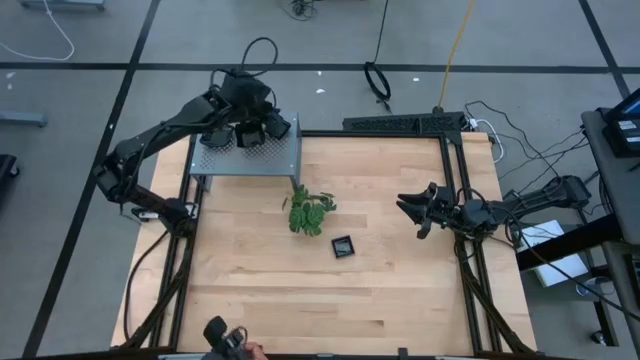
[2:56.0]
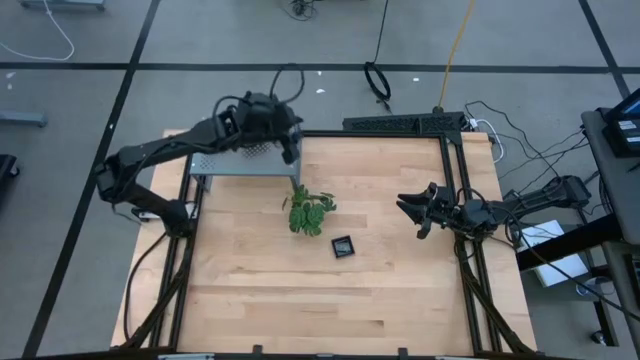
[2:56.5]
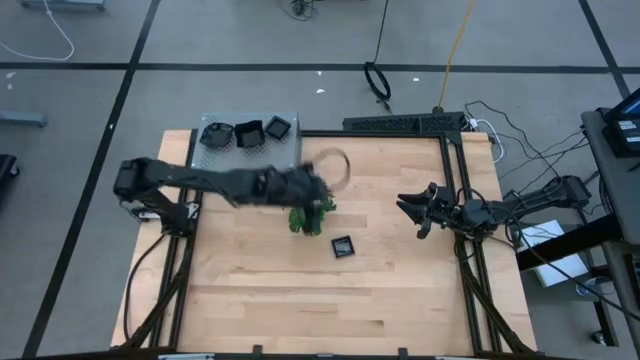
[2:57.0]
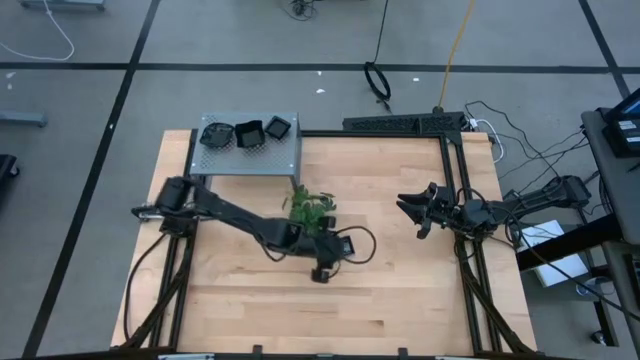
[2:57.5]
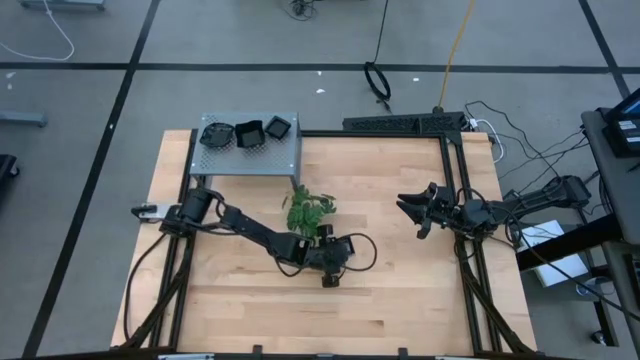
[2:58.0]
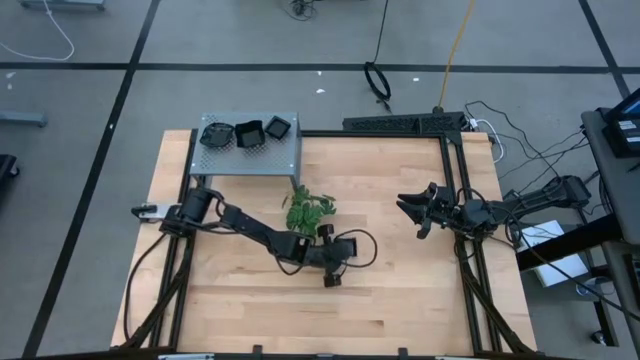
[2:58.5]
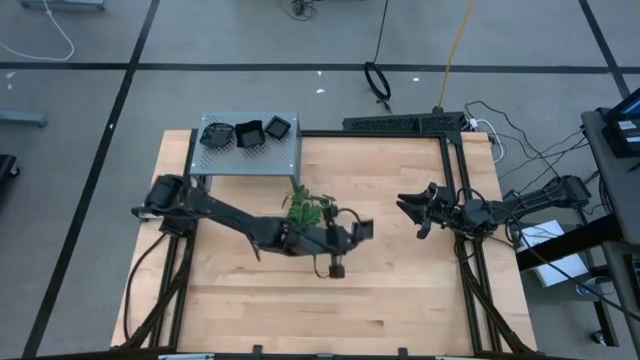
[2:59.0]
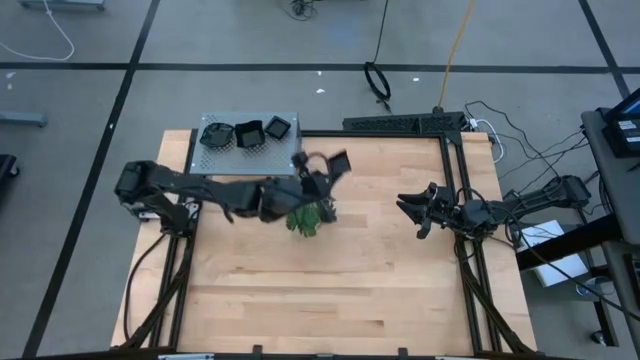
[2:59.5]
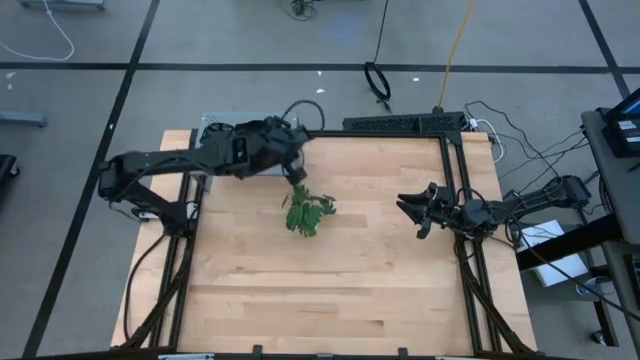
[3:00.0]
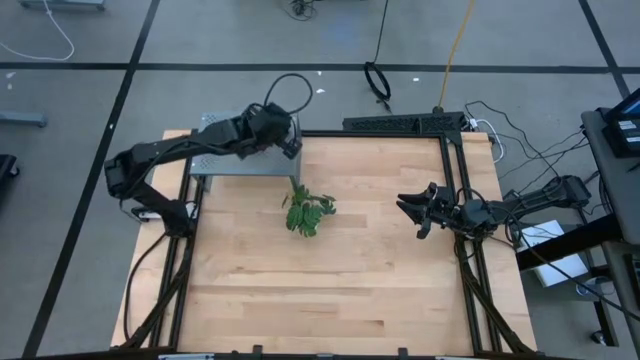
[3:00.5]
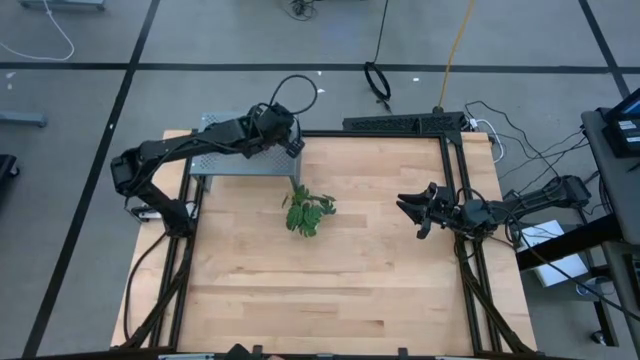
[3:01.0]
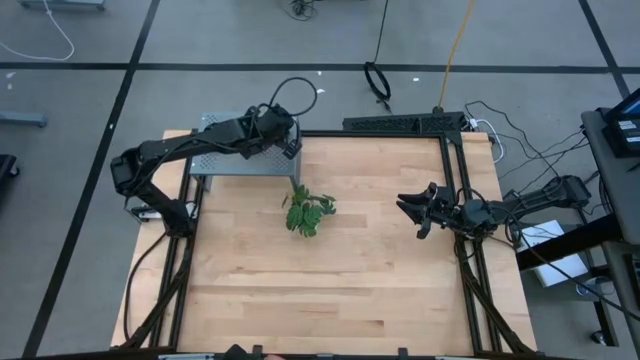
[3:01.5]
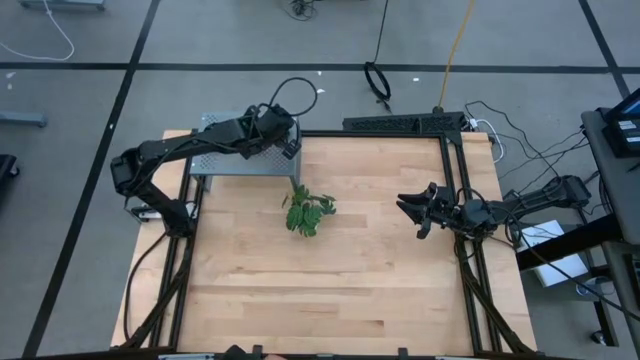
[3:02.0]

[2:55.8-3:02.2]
Task: Pick & Place Mini shaped plates
Stack the square plate on top of the square plate on the shelf

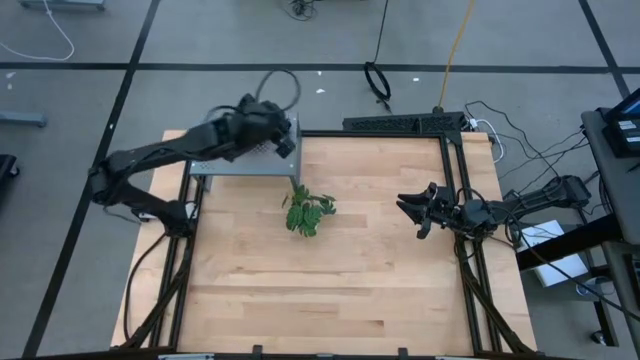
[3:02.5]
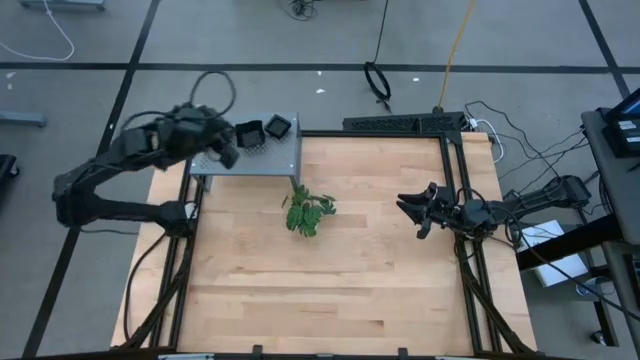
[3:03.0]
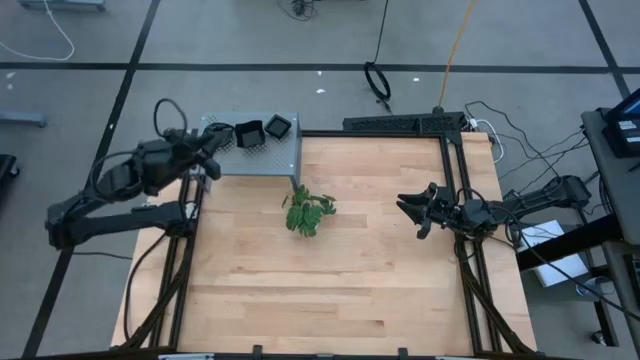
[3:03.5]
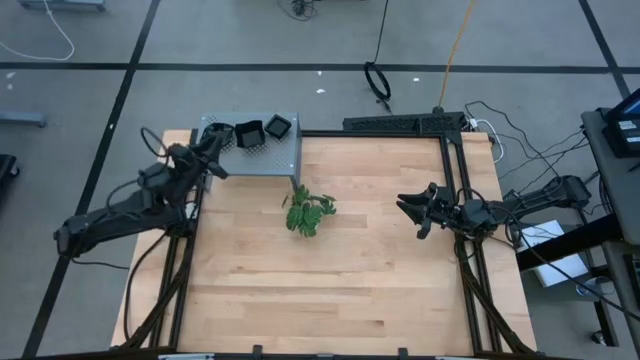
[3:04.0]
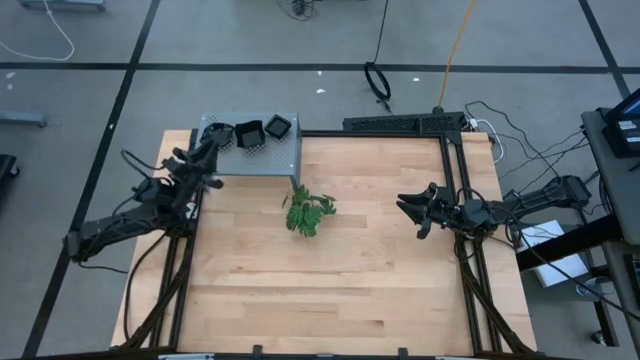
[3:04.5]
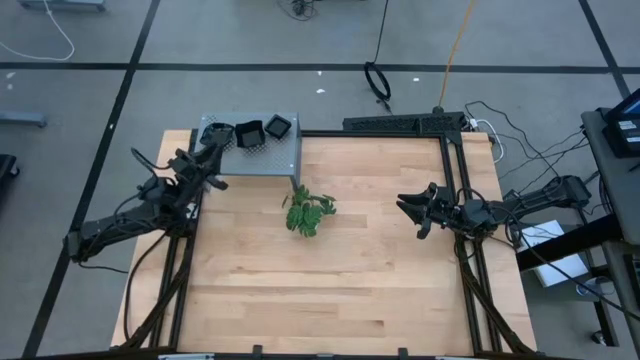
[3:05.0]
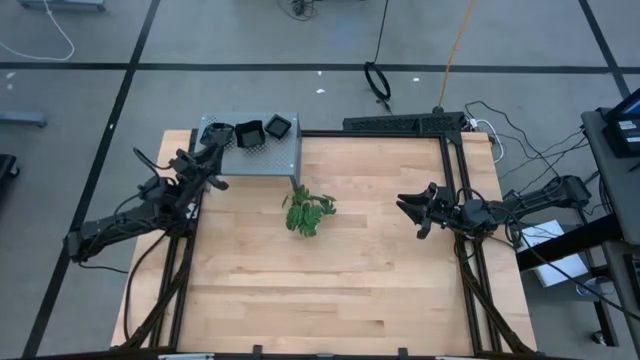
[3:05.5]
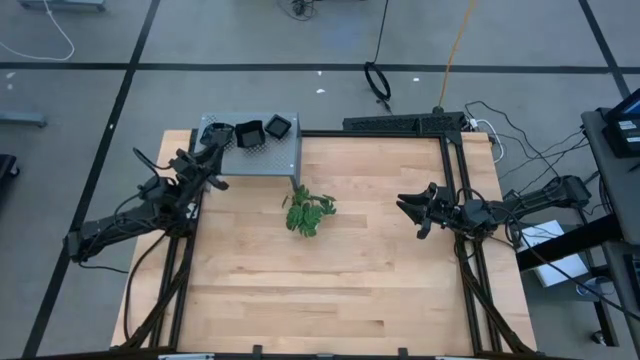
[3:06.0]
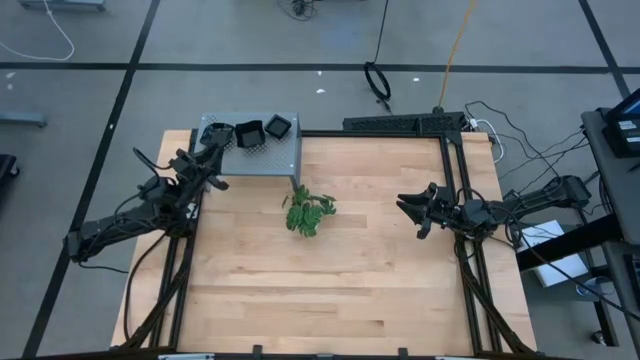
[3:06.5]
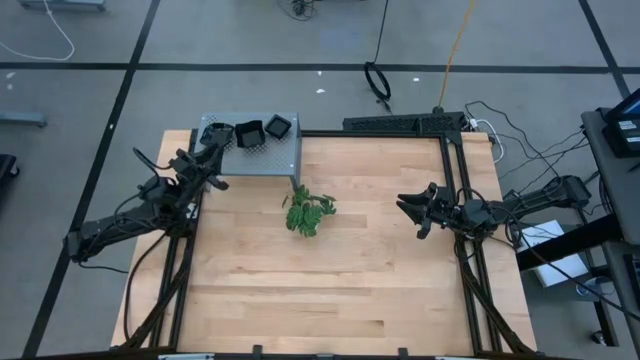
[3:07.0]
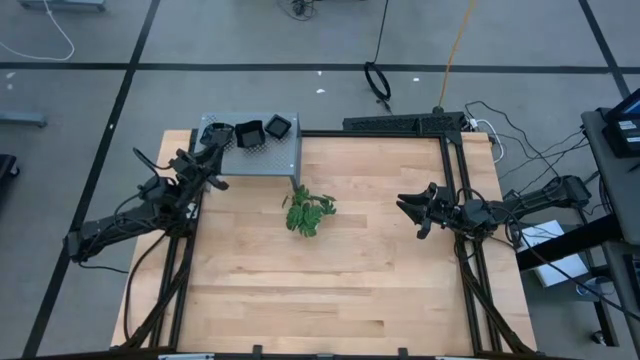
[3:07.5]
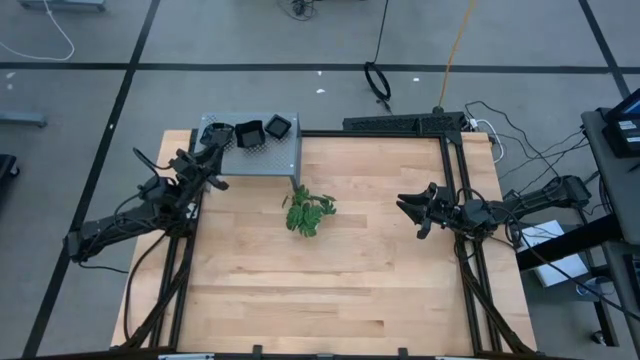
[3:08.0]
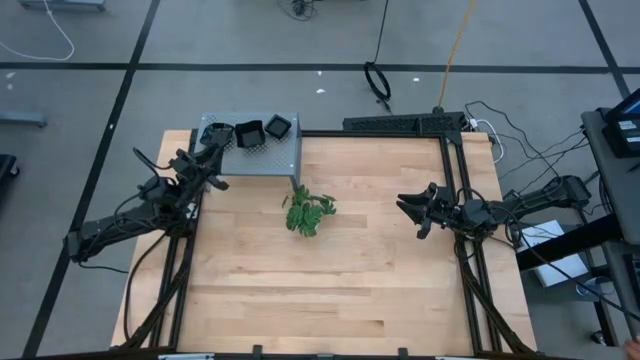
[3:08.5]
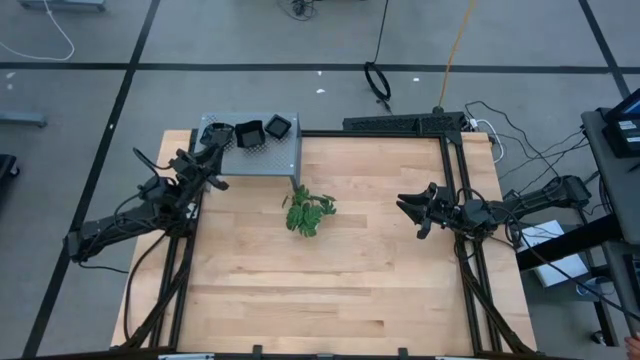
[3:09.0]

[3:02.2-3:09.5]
Return to Home Position

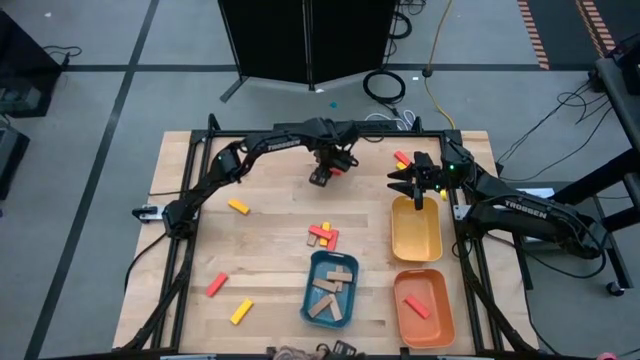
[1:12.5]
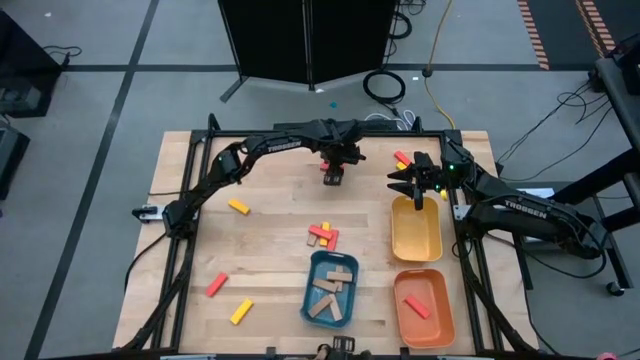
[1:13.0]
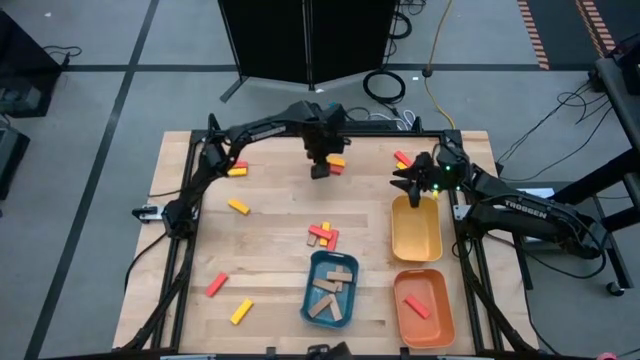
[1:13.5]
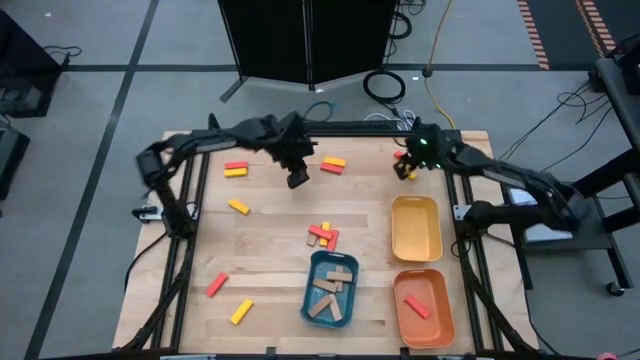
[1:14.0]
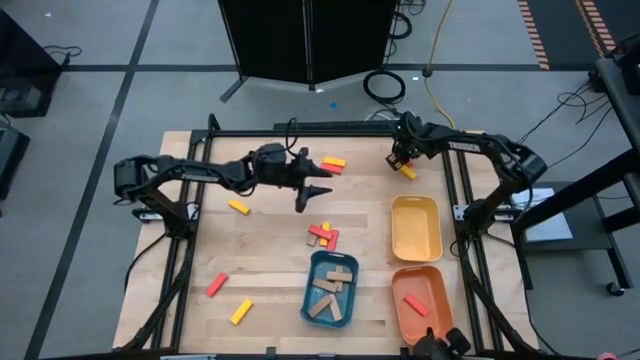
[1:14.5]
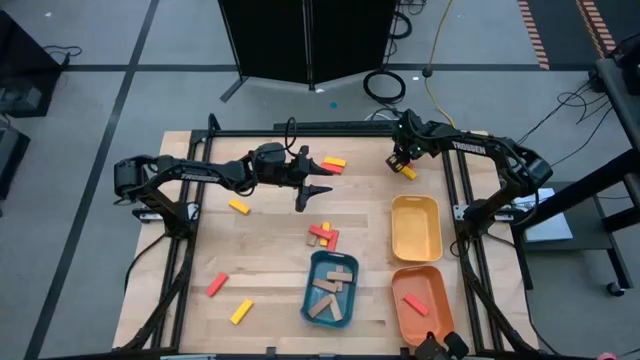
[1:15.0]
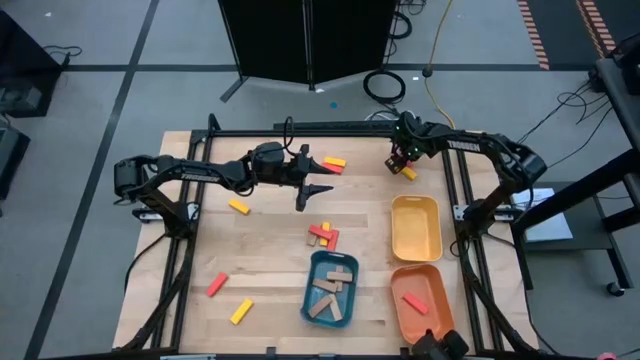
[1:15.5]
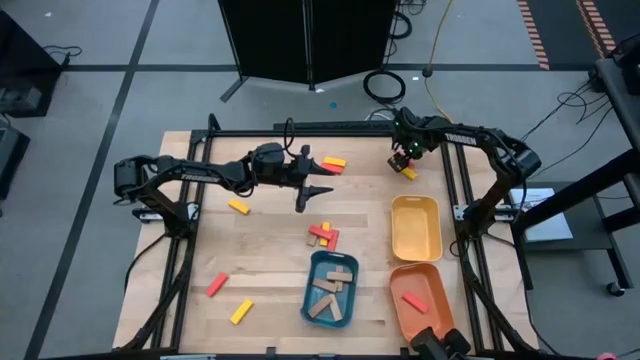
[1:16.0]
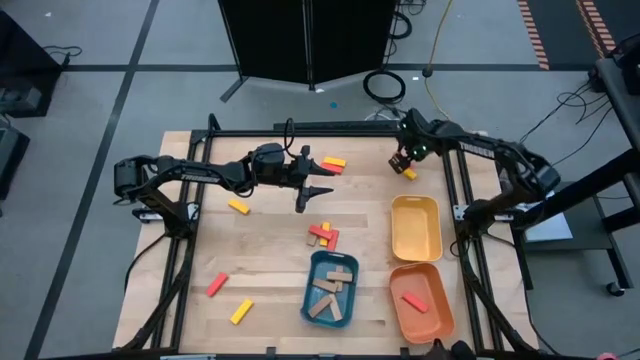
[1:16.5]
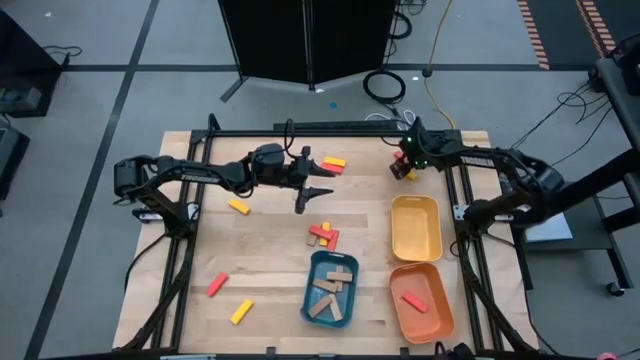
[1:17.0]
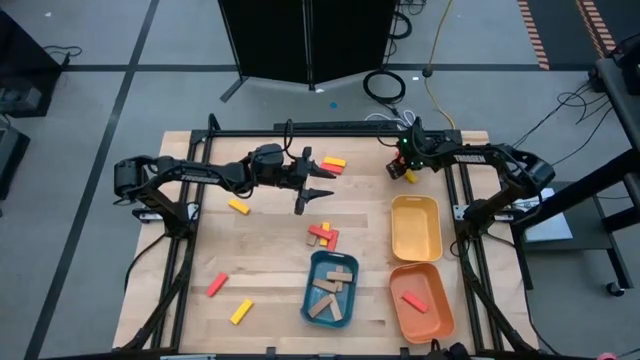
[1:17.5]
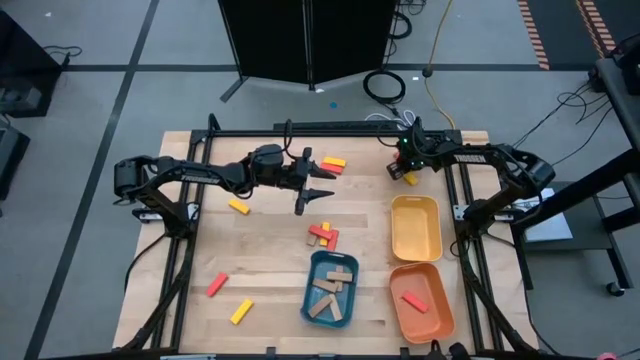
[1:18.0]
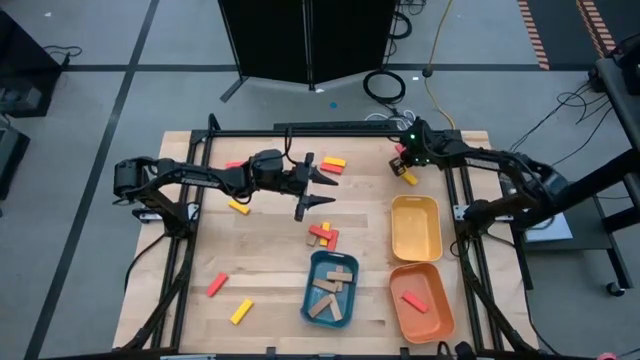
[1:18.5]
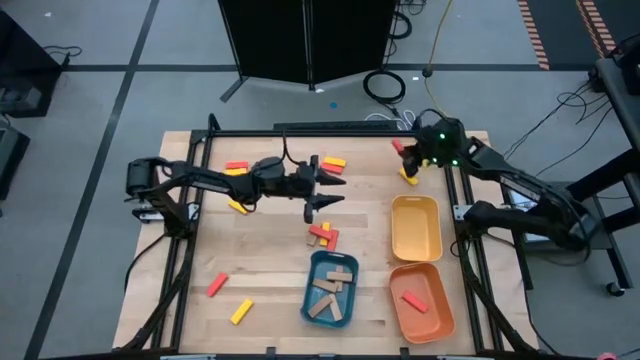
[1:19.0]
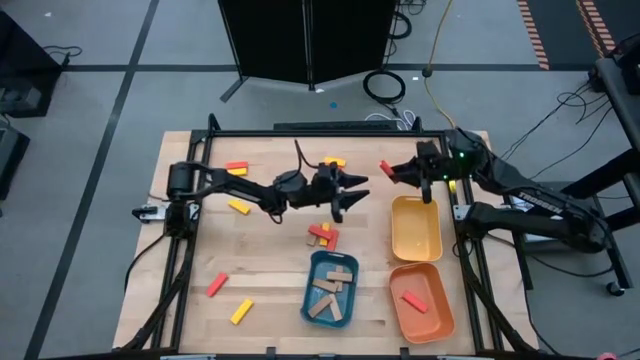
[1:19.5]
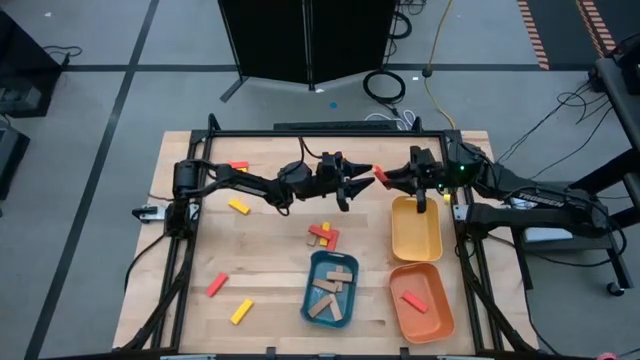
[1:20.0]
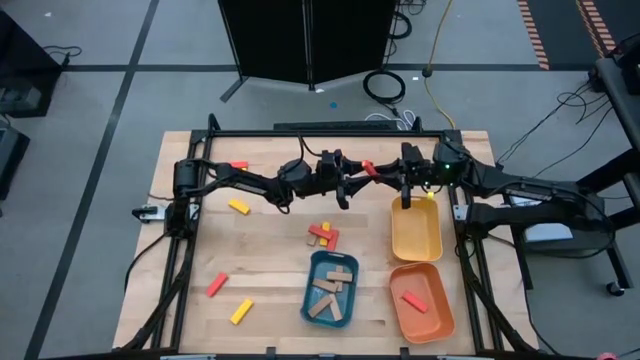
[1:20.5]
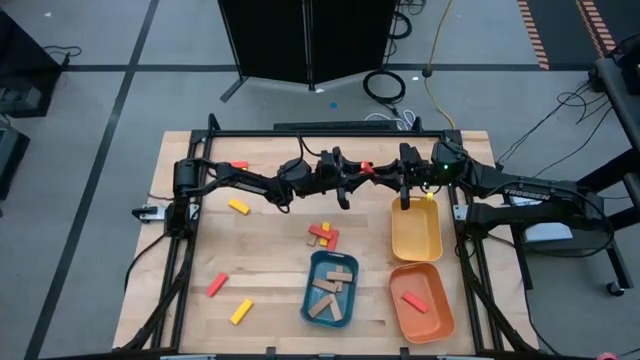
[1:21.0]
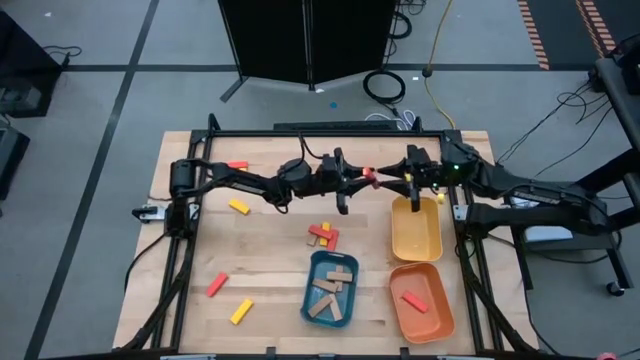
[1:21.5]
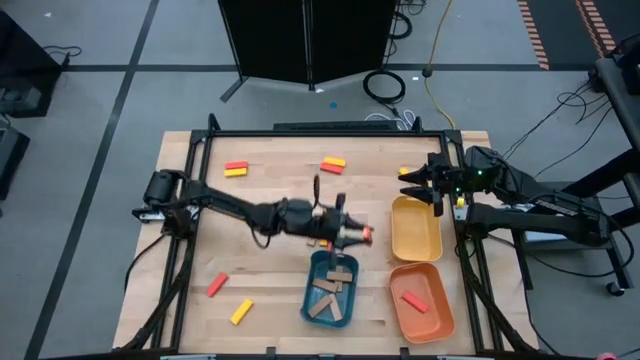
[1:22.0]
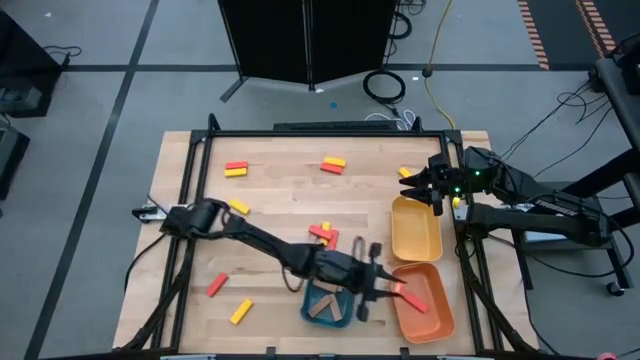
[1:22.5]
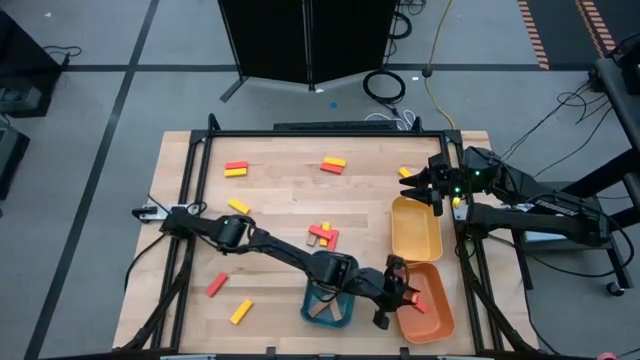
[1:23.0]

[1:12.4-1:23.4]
Task: Sort blocks
Put the orange block into the orange bin
